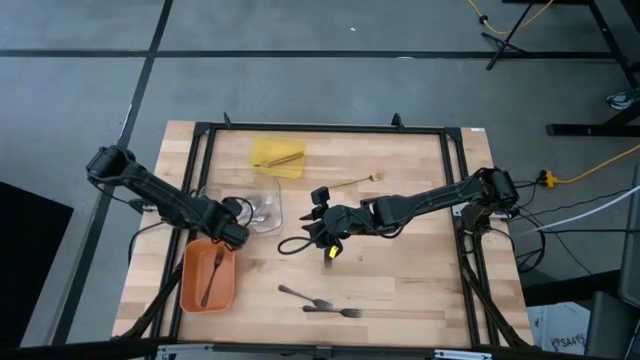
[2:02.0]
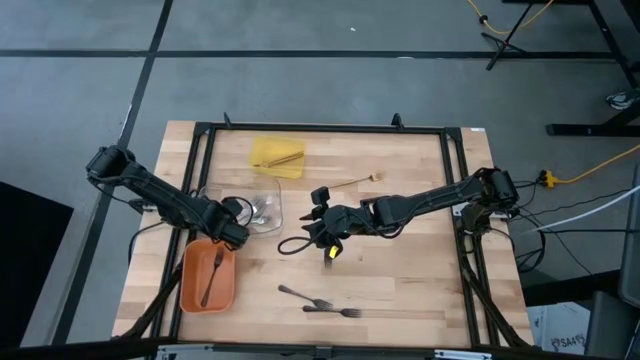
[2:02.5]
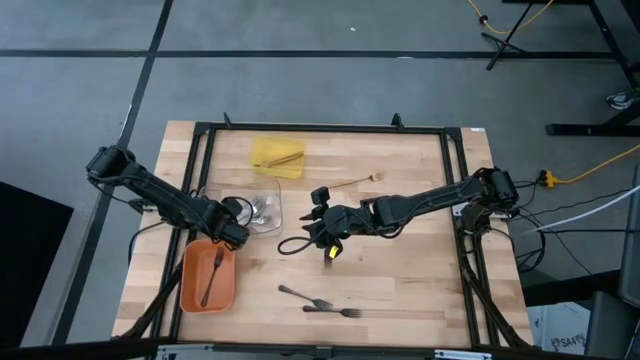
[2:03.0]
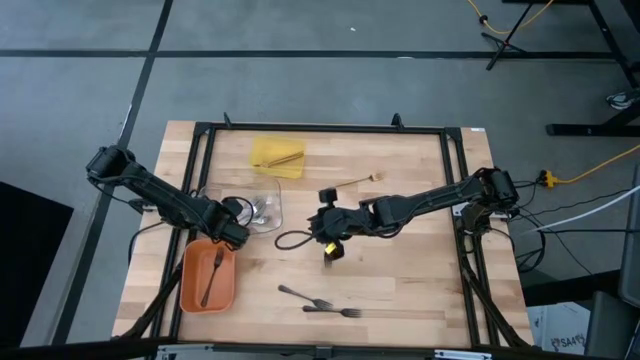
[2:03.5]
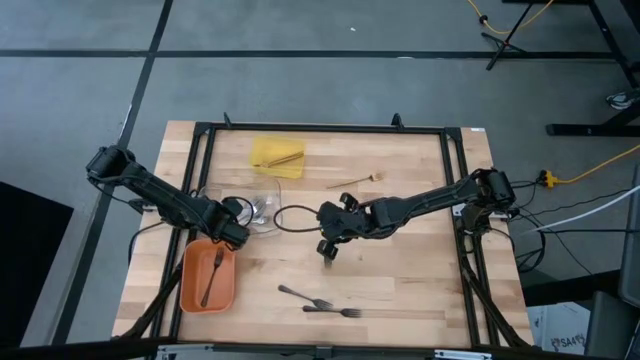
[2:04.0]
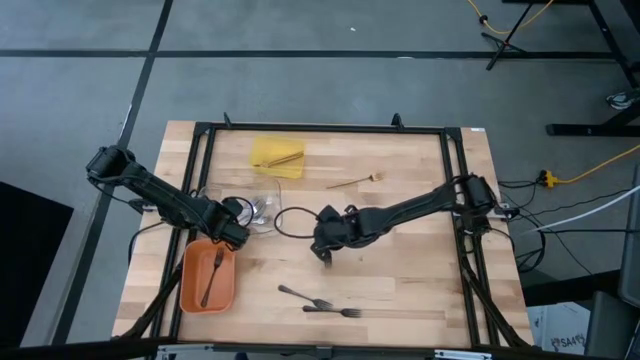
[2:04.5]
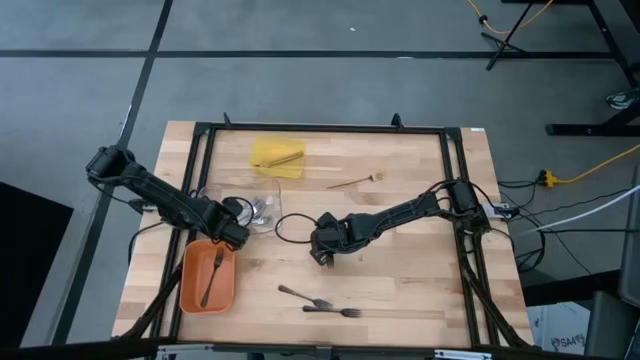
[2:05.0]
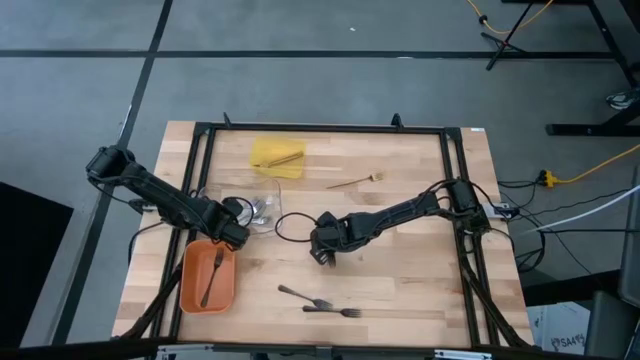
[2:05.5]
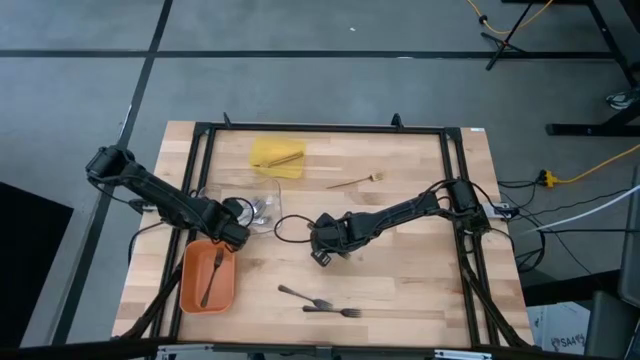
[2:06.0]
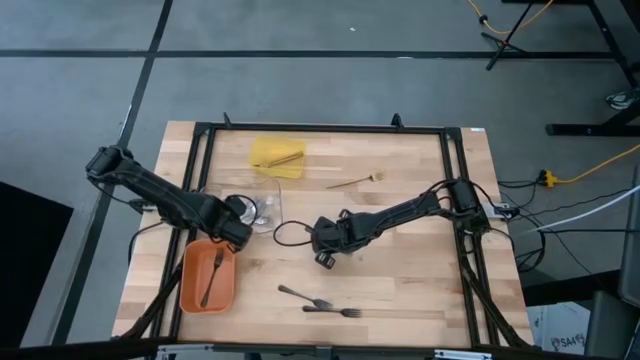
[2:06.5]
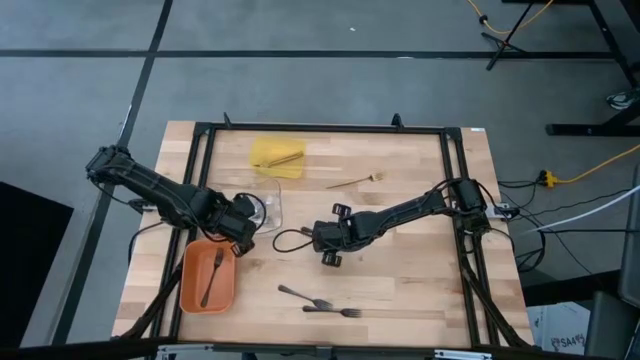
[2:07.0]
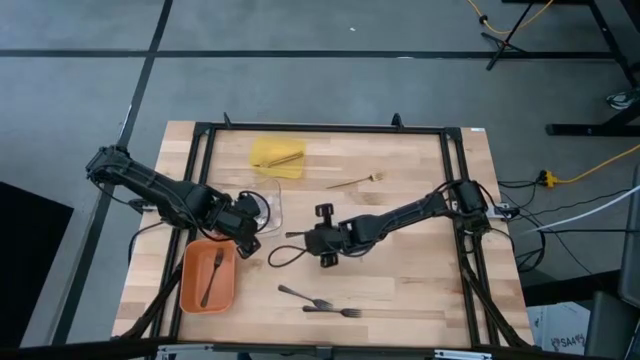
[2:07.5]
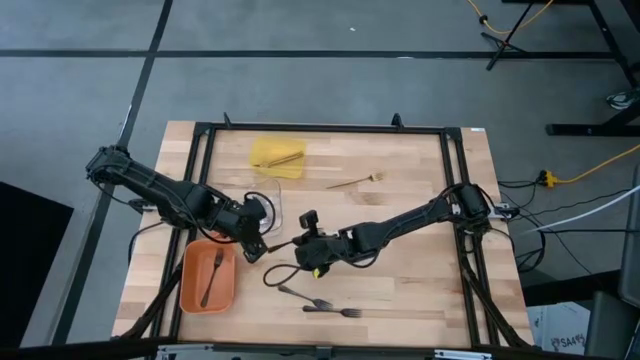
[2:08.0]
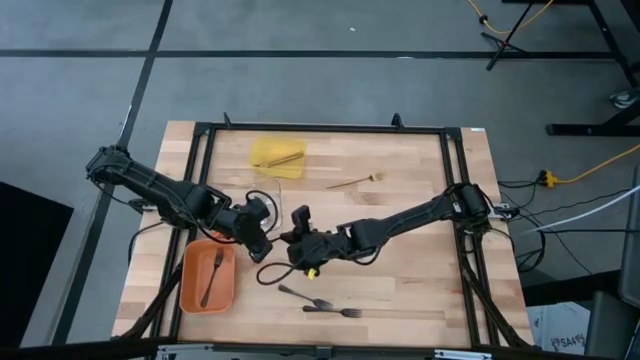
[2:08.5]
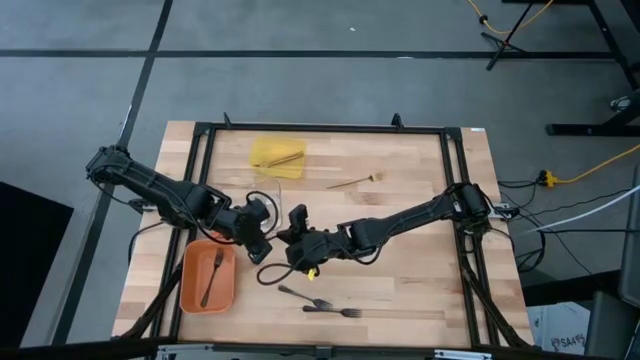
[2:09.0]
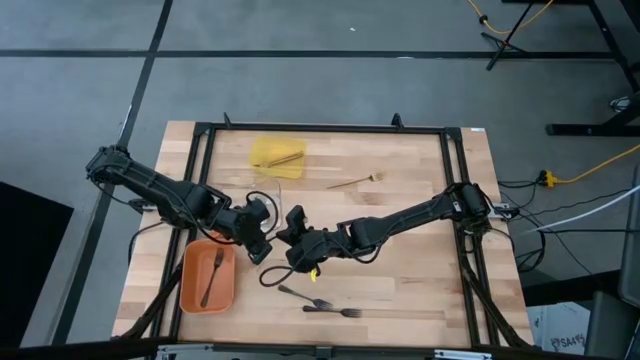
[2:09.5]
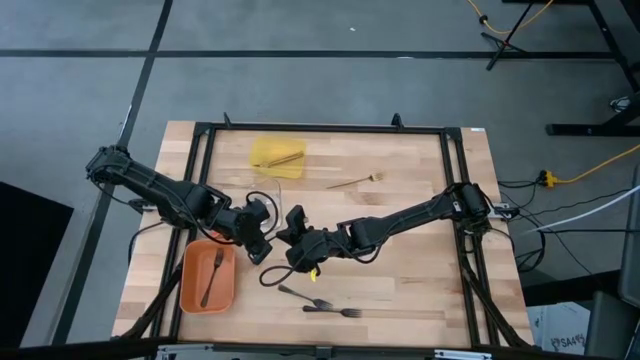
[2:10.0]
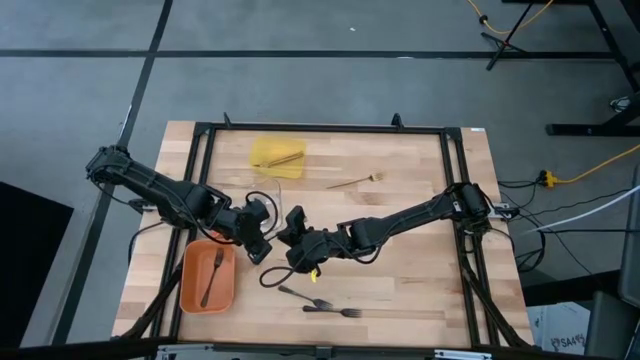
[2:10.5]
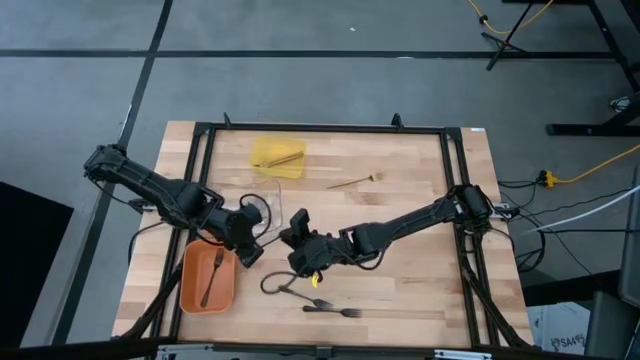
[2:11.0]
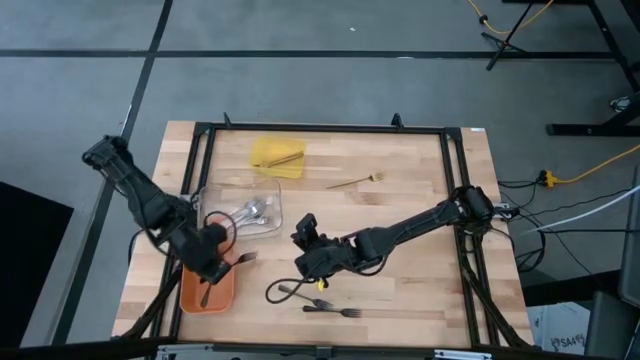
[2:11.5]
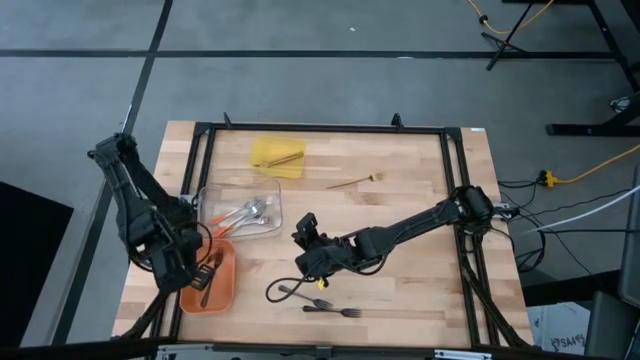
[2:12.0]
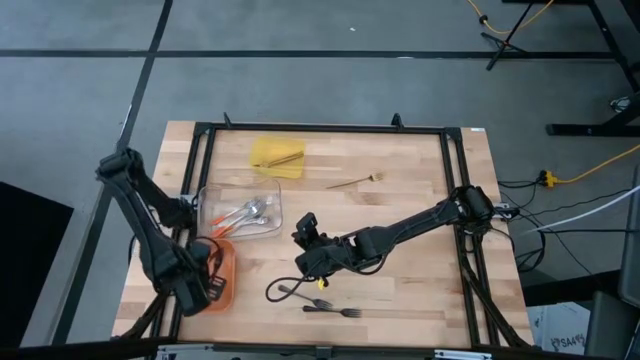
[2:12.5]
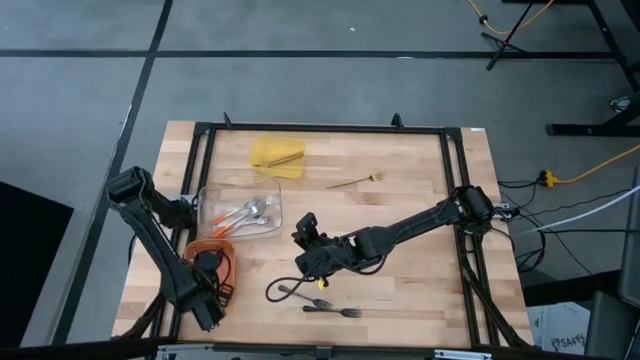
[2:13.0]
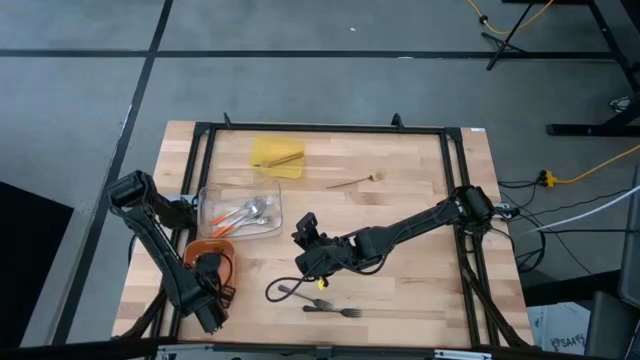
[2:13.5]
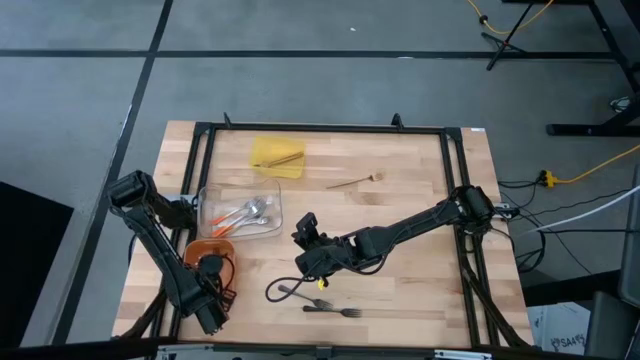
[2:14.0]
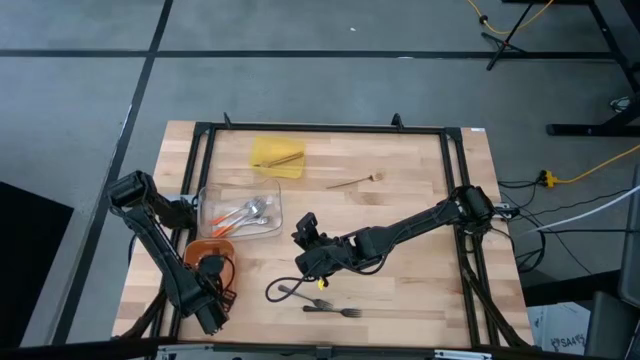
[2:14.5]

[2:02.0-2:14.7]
Task: Sort silverware by color (type)
Put the black fork into the orange bin

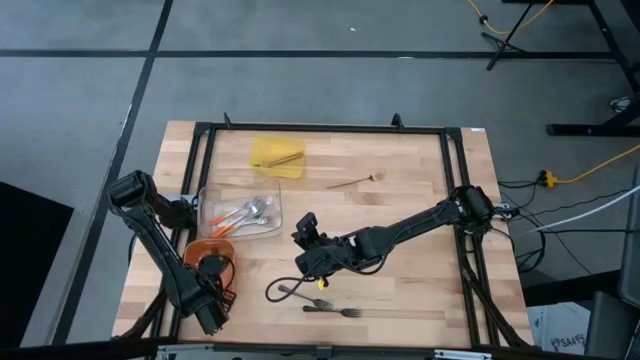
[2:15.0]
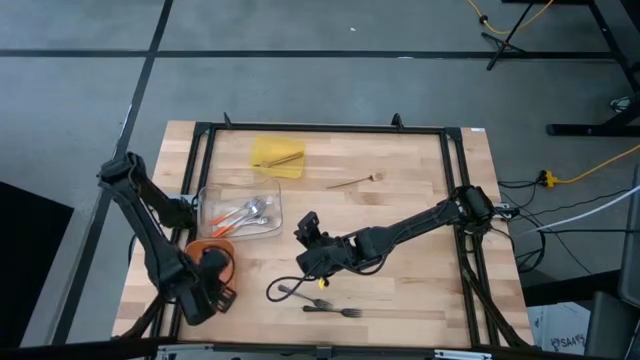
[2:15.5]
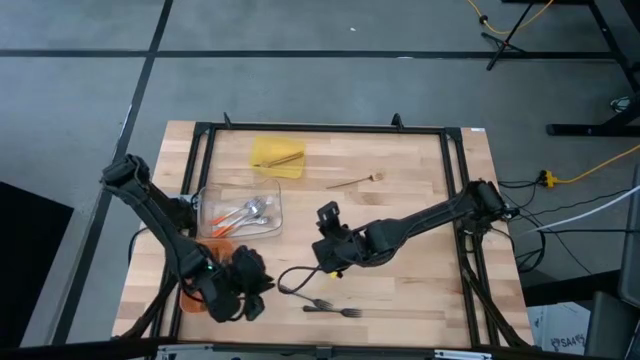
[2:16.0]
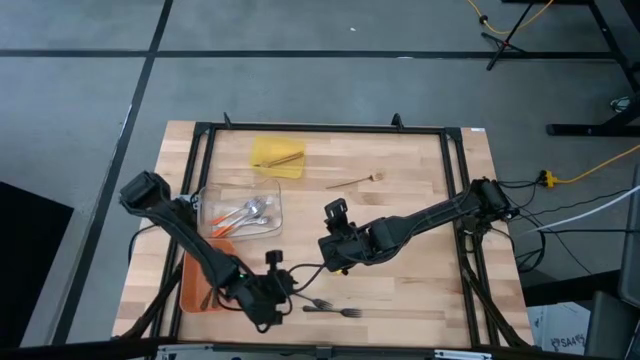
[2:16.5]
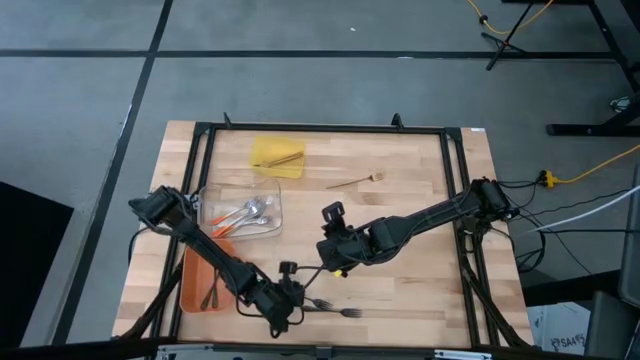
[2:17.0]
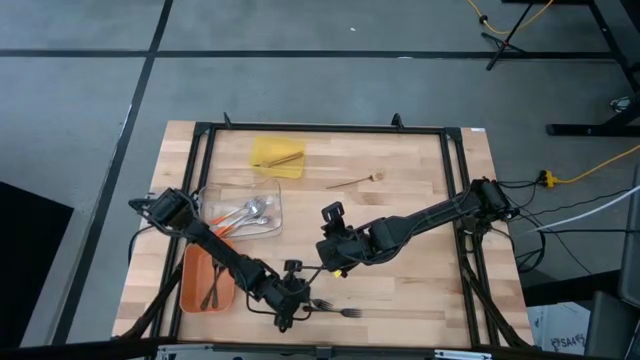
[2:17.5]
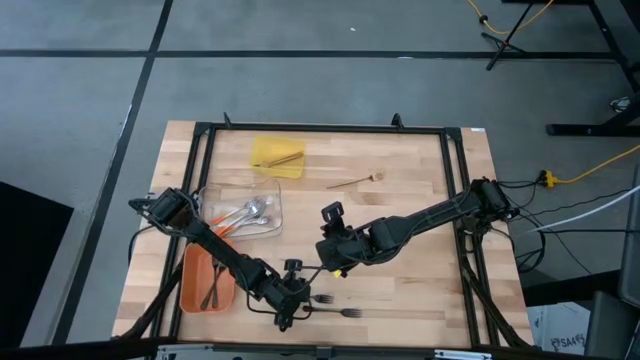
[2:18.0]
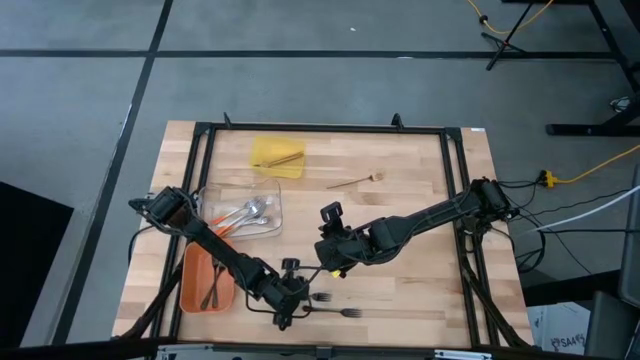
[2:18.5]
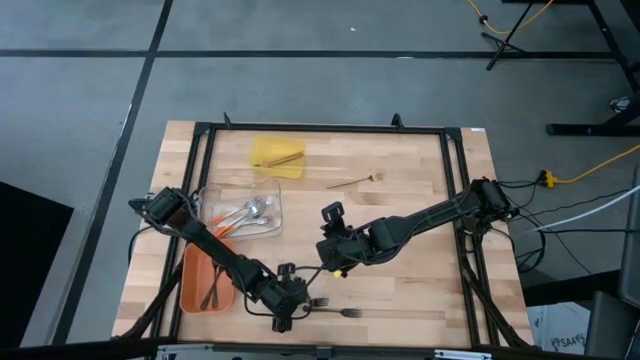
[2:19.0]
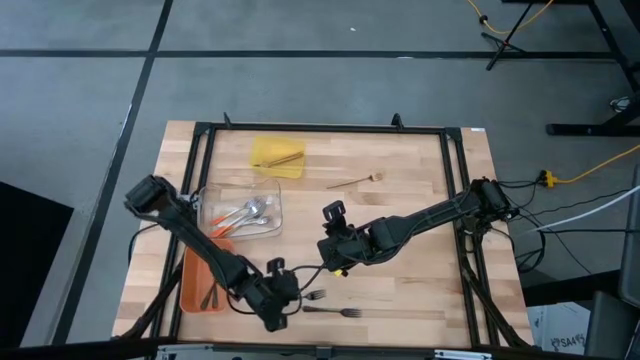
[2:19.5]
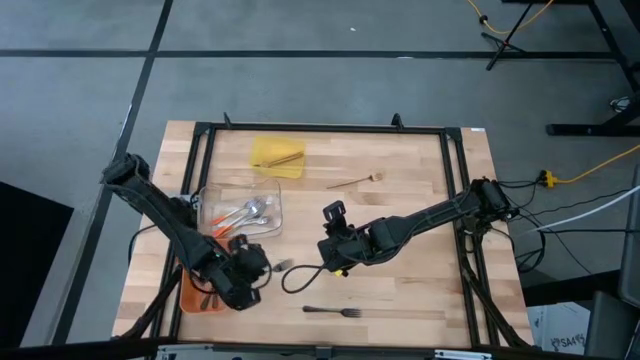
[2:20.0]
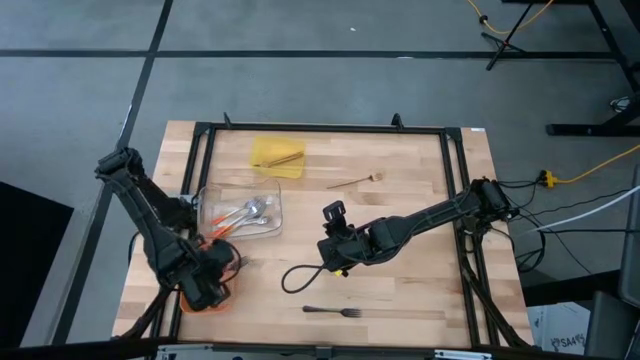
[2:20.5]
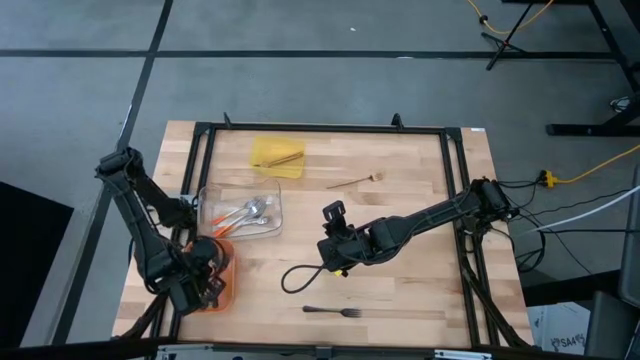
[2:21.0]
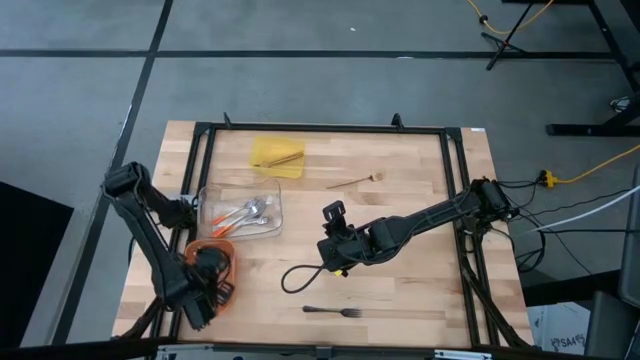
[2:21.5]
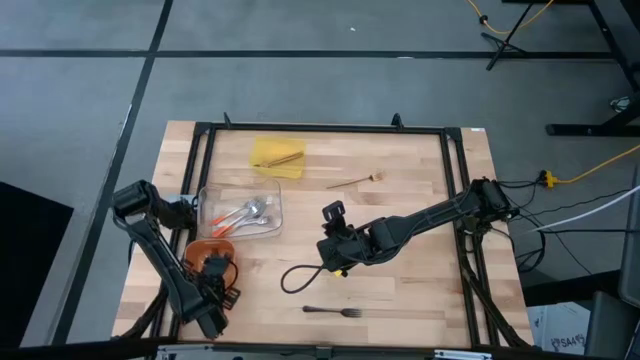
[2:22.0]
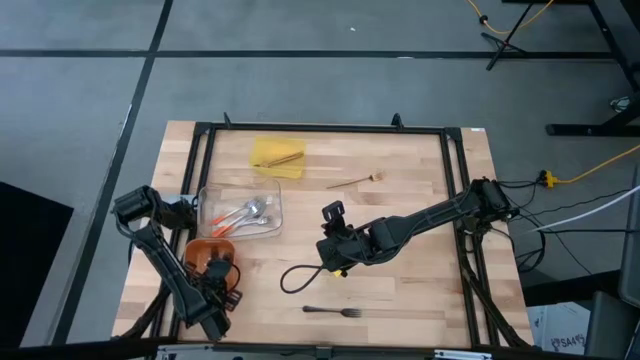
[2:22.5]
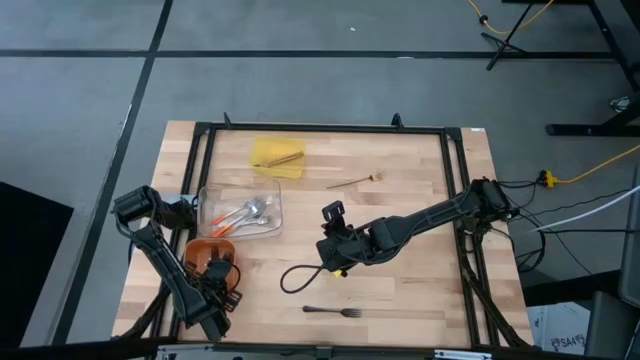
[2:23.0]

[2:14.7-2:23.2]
Put the black fork into the orange bin
